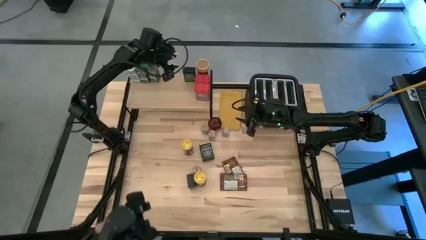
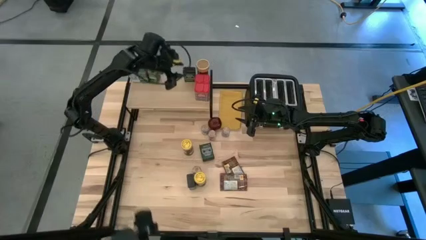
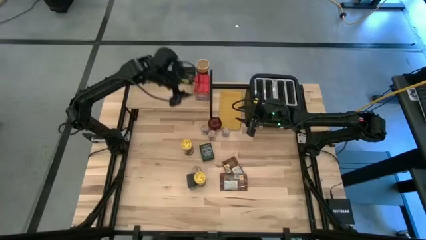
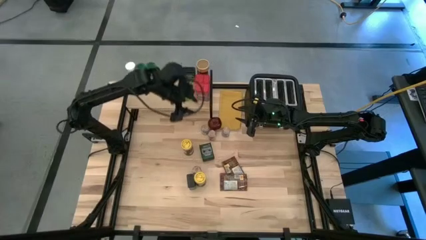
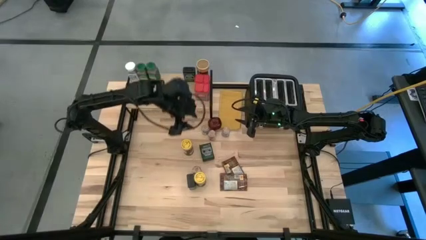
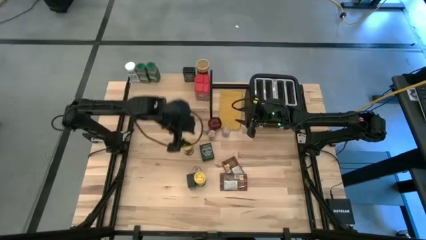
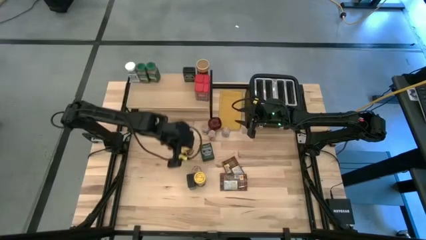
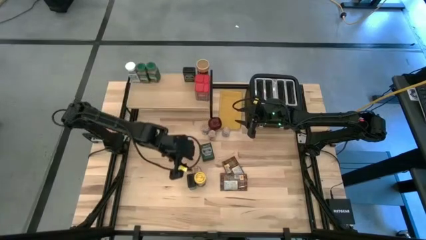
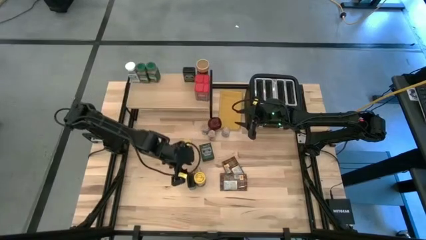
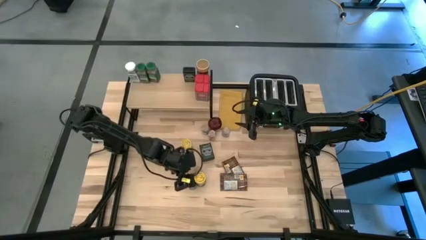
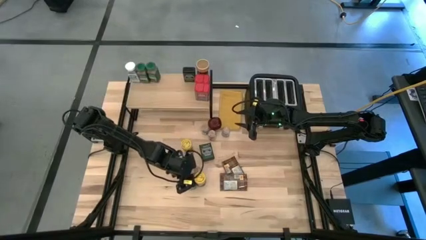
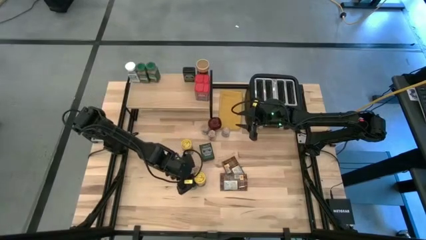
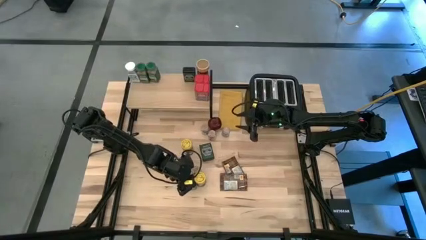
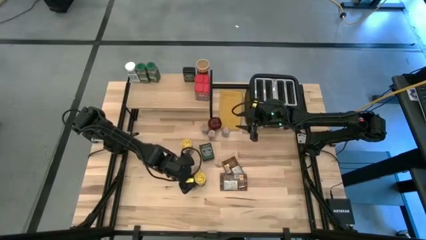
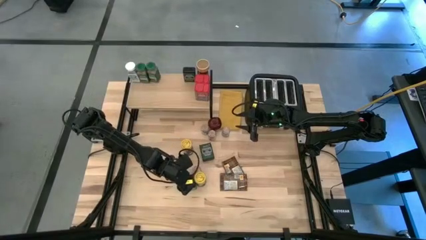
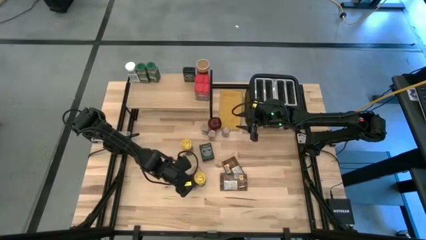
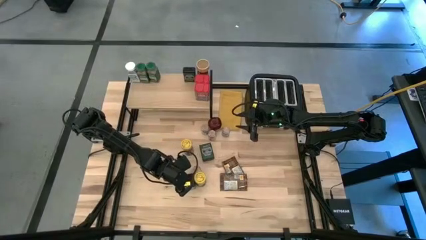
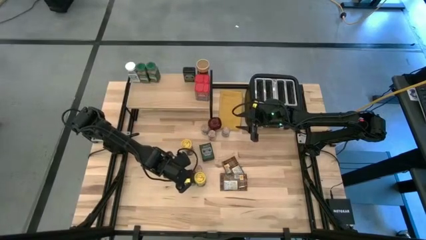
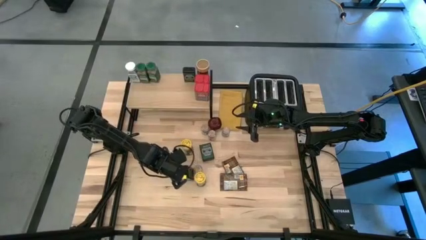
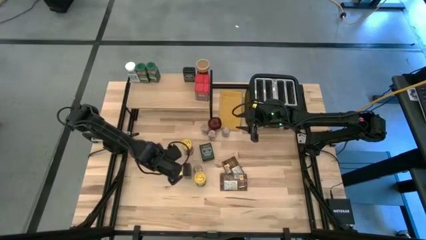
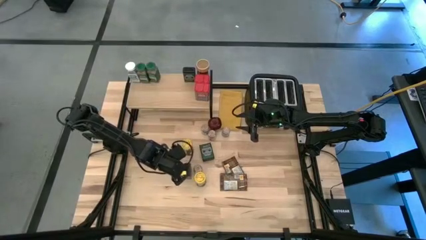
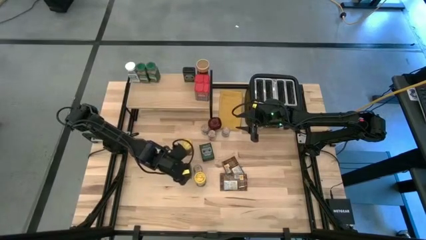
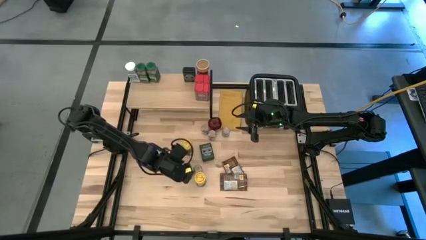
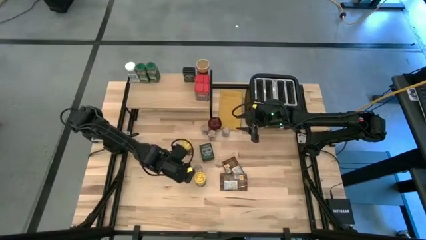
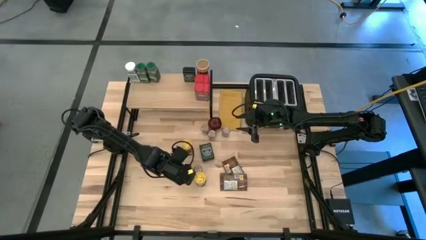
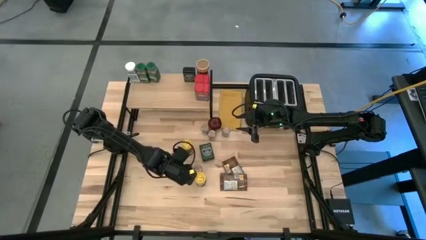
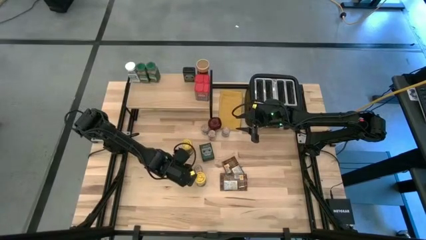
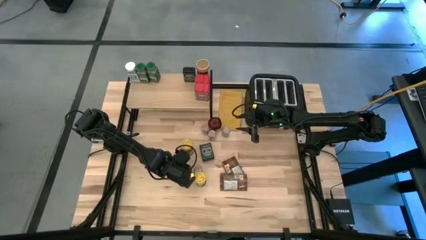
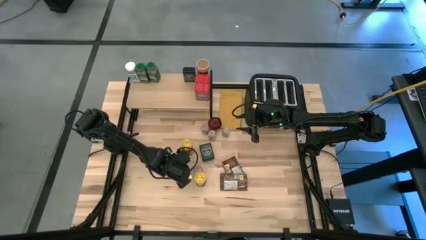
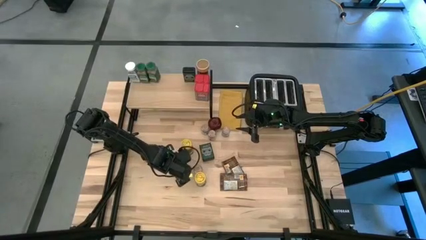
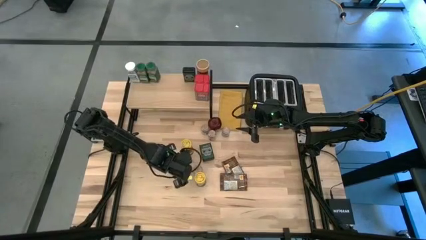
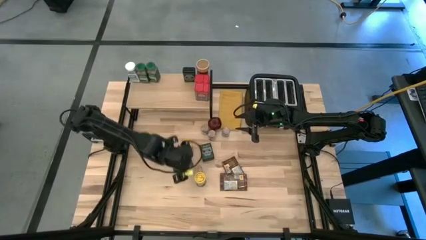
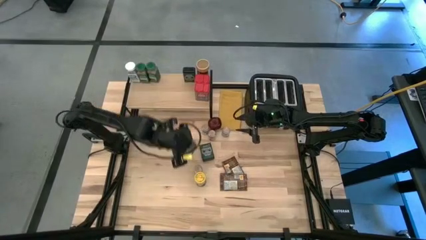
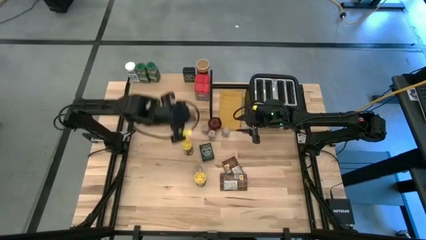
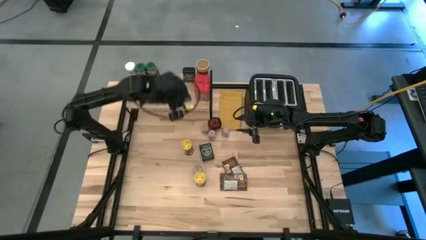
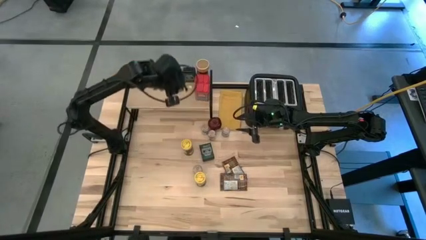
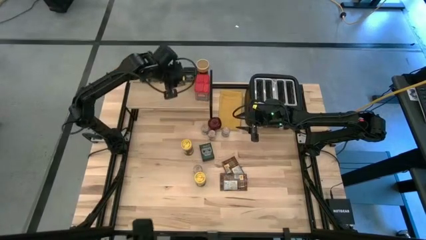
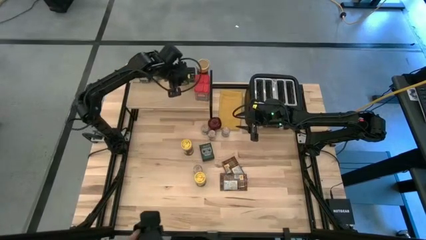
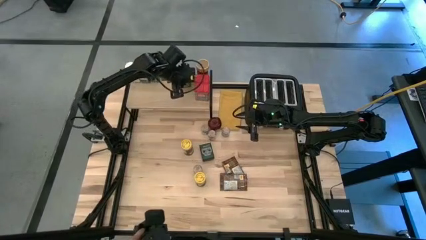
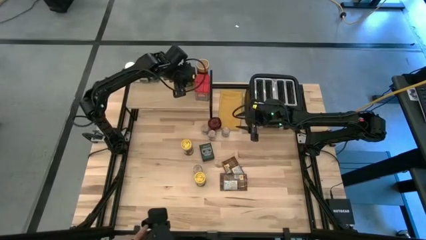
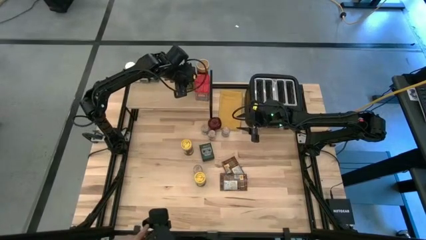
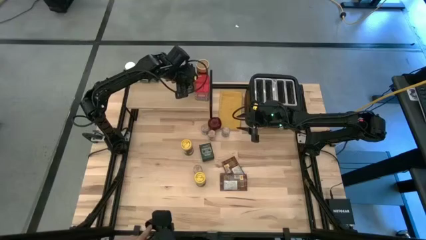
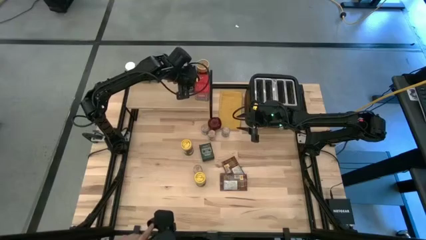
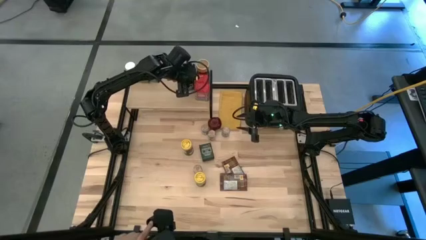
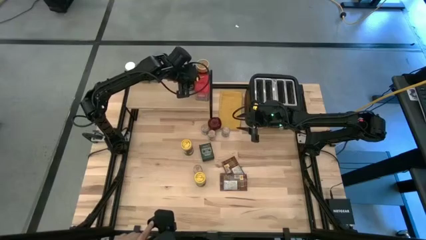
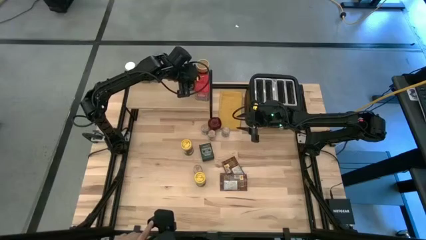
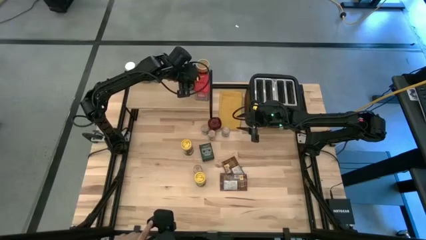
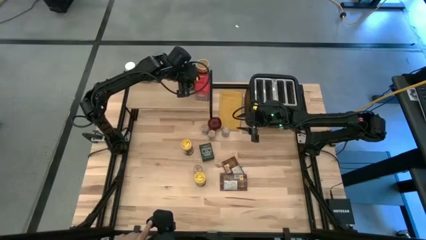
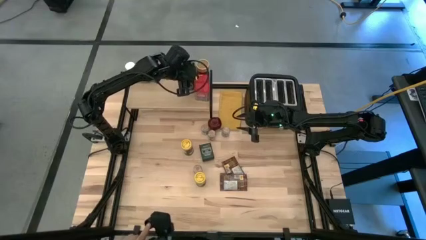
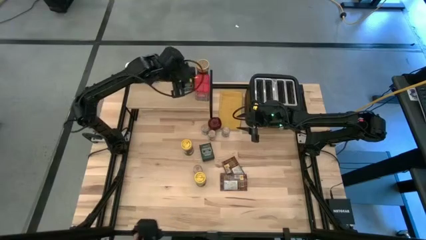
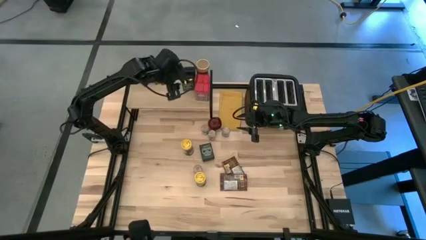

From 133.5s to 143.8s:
Task: Shelf spices
Put the bottom black seasoning can aligned with the other black seasoning can on the shelf

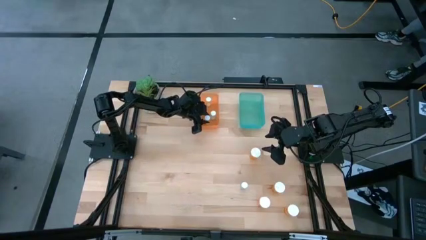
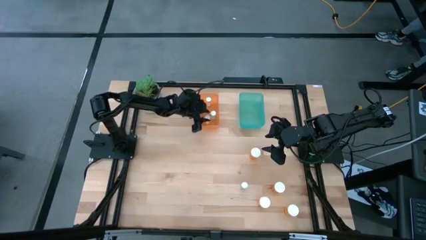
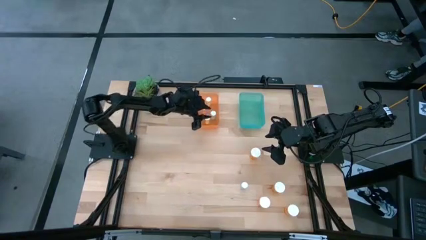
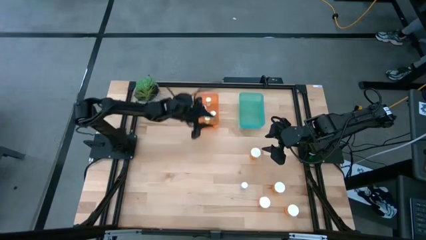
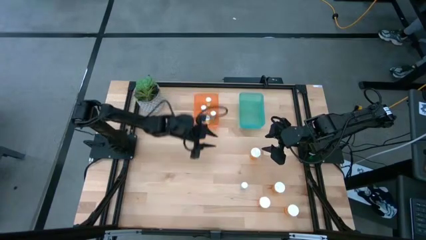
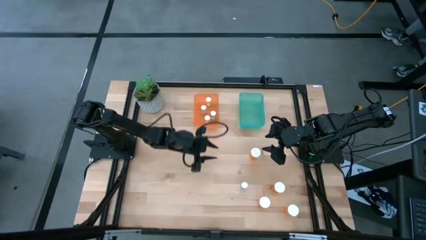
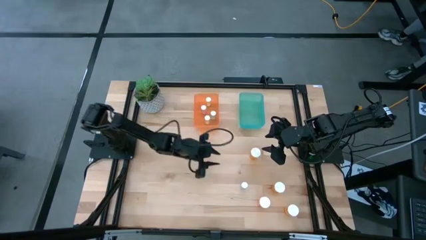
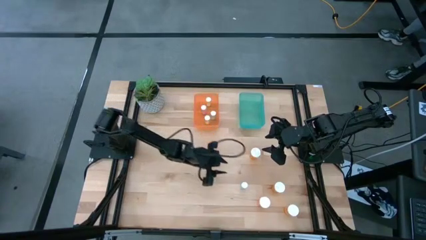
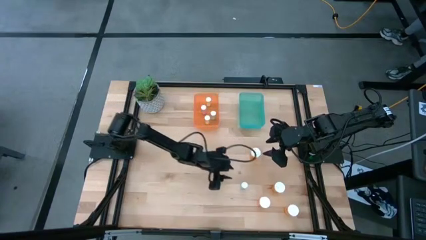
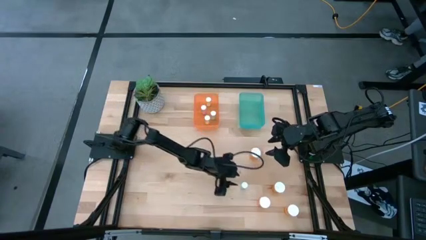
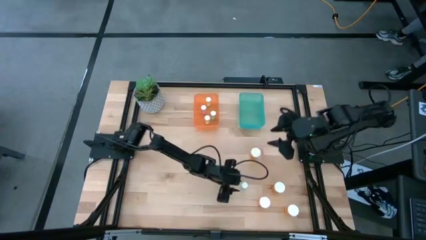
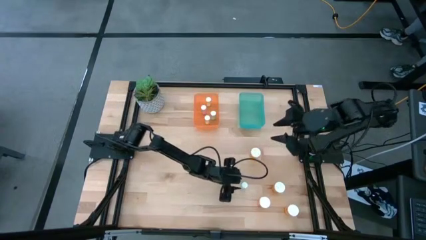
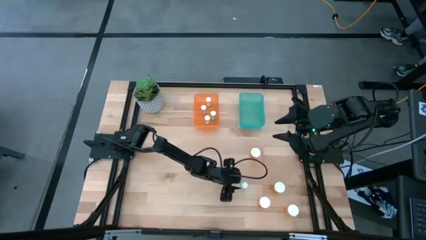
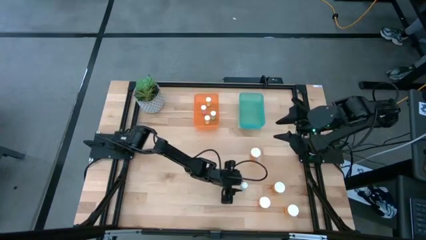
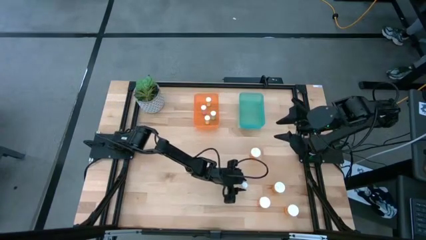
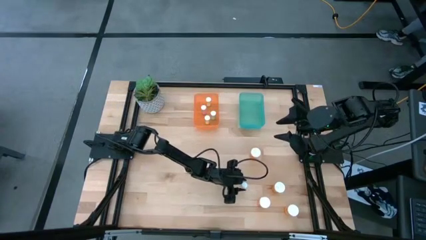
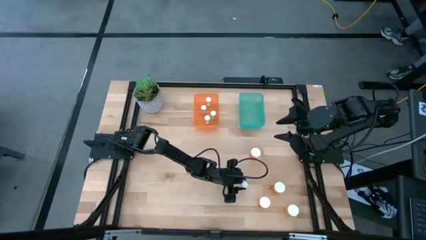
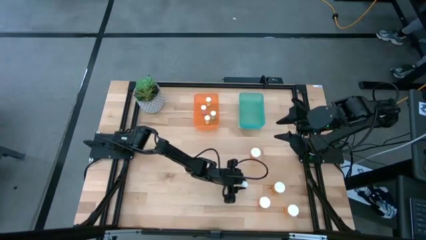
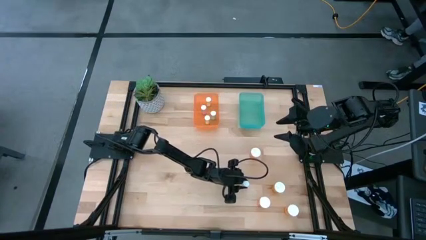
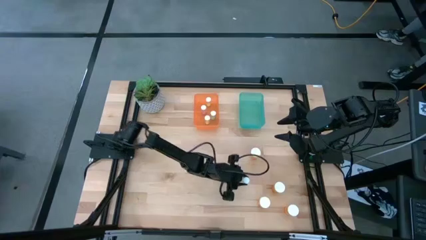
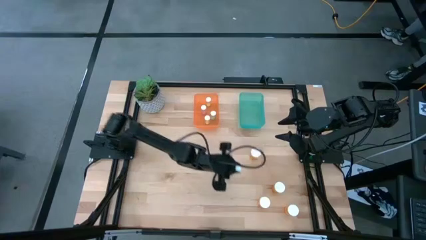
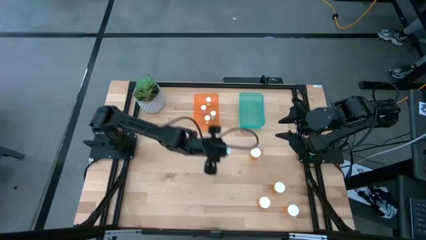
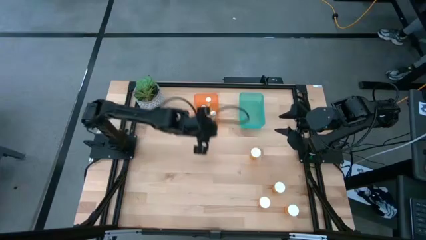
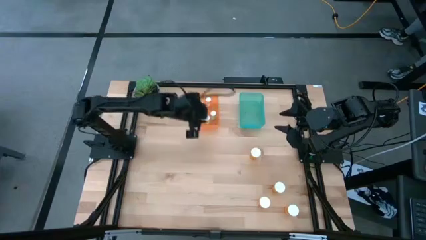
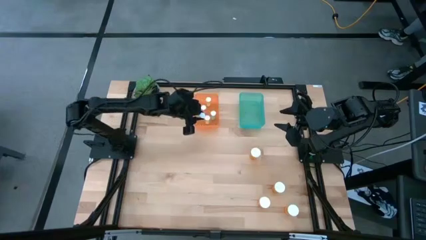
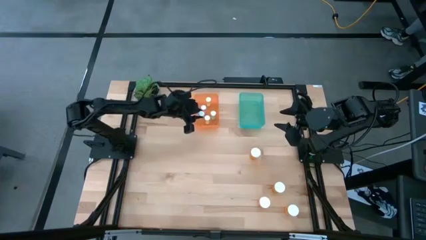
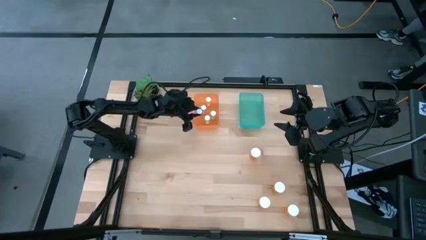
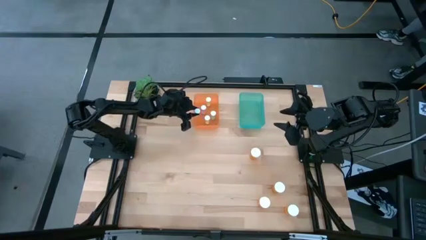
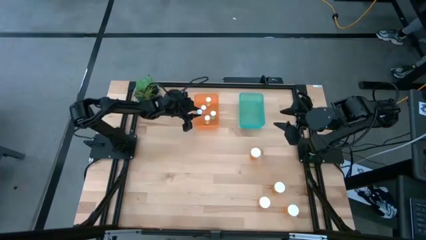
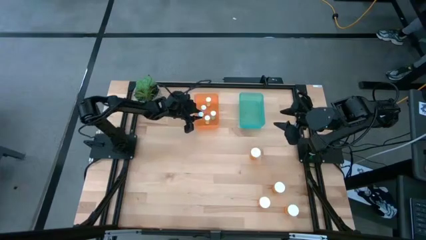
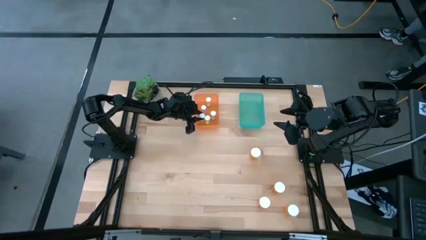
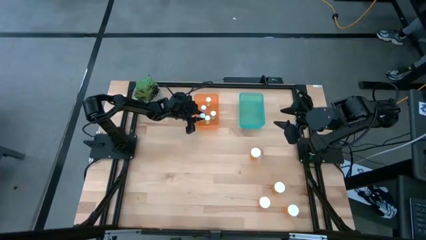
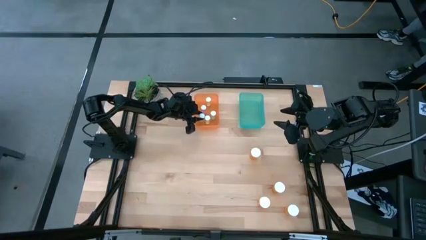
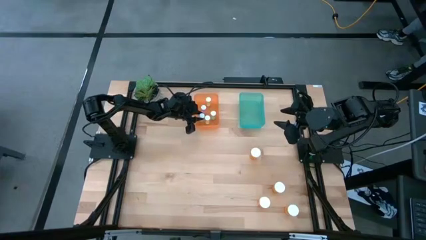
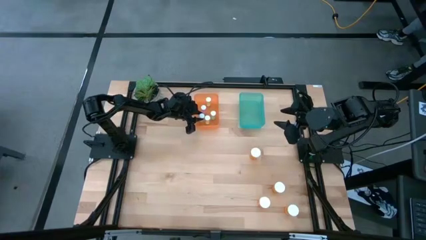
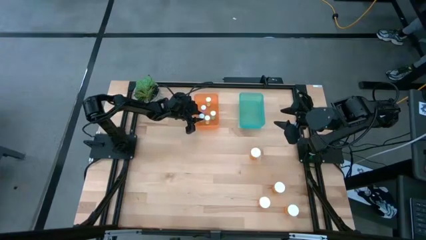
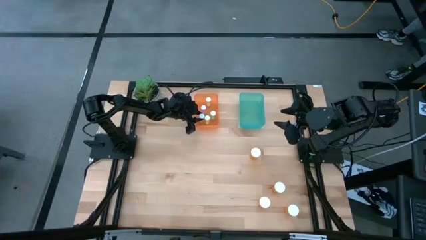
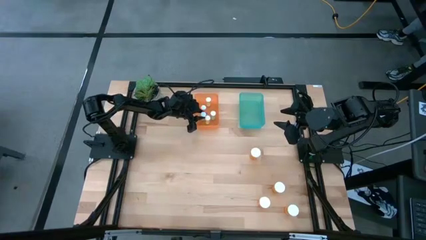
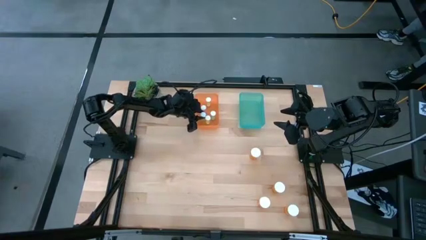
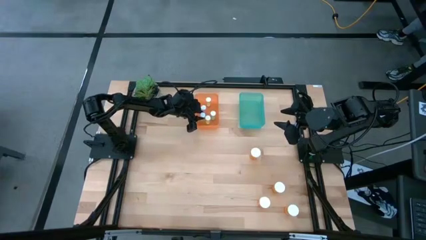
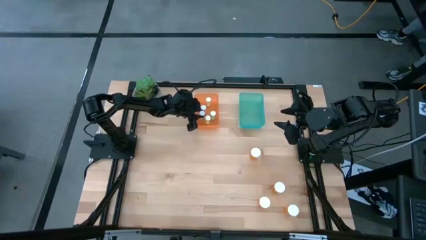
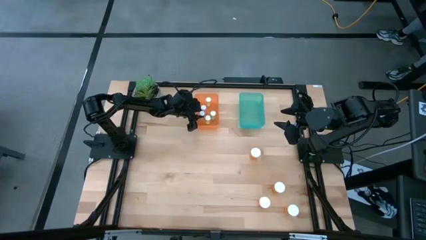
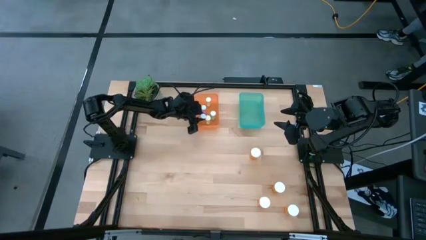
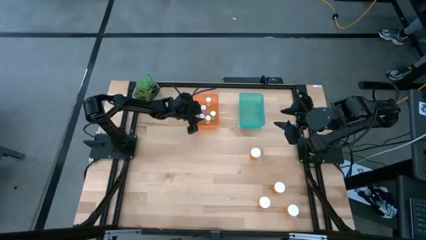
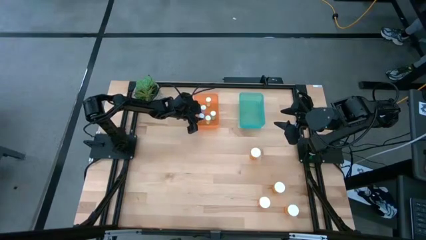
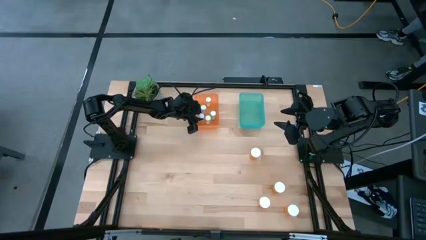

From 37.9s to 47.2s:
Task: Pick and place medicine bottles into bin by pill shape (circle, oval)
Put the small blue pill bottle into the orange bin
